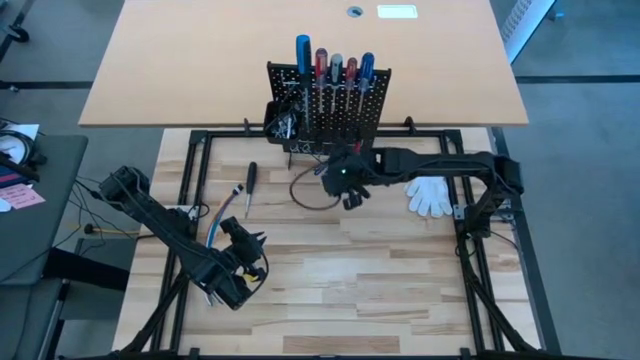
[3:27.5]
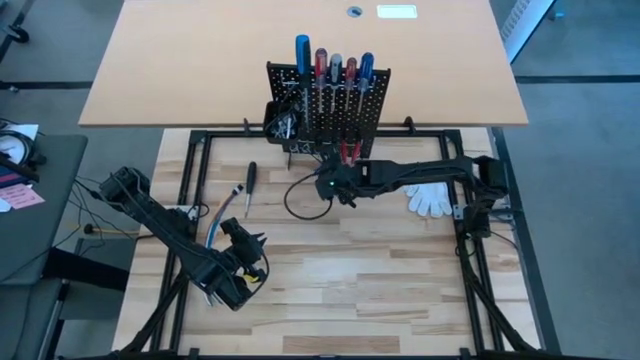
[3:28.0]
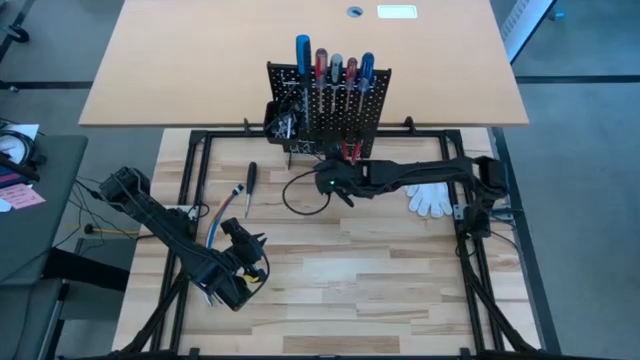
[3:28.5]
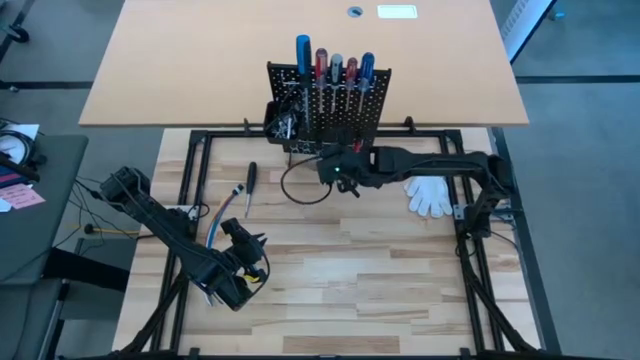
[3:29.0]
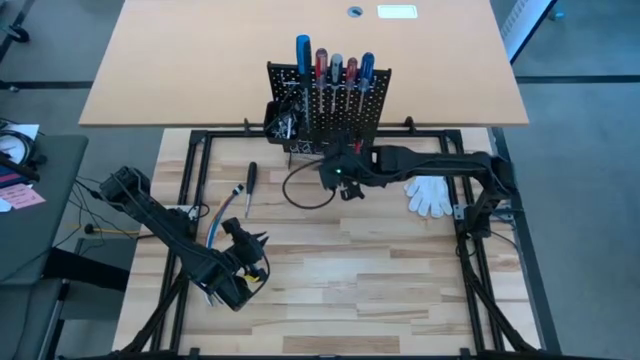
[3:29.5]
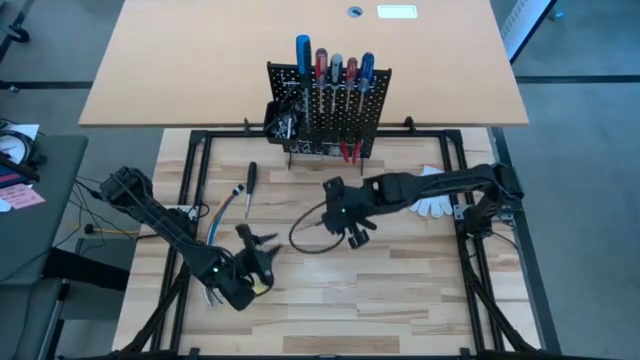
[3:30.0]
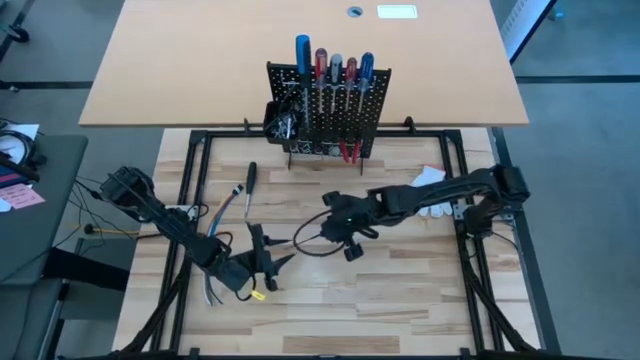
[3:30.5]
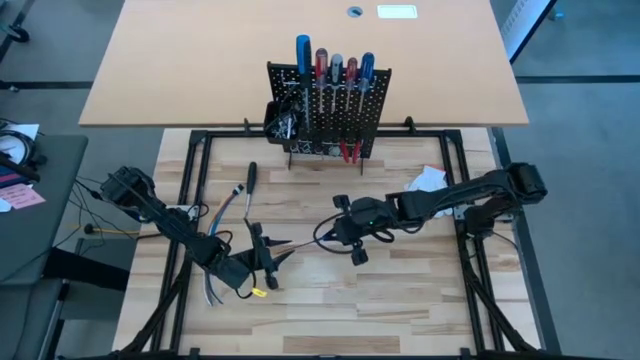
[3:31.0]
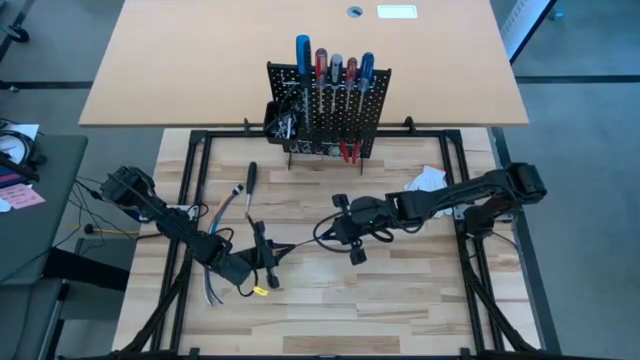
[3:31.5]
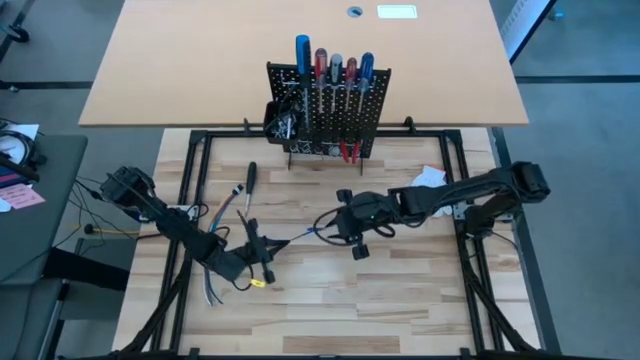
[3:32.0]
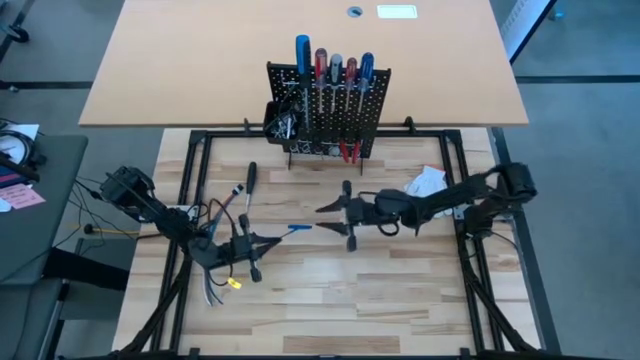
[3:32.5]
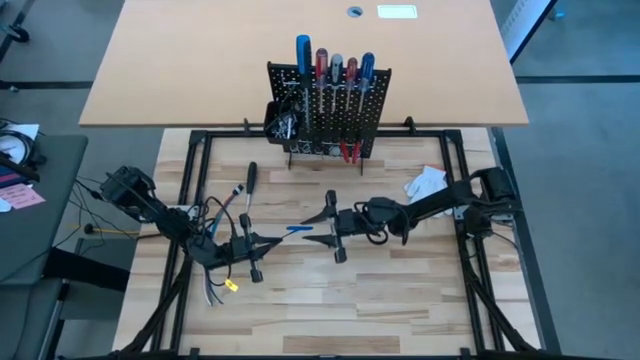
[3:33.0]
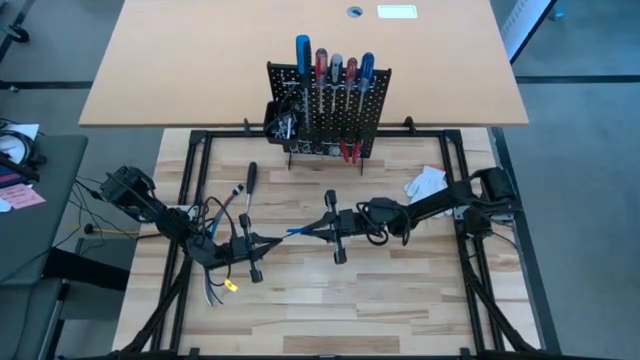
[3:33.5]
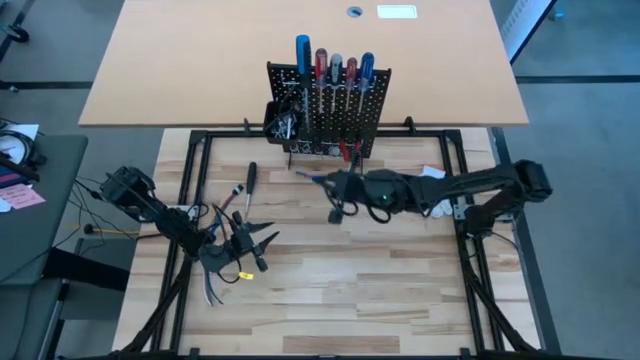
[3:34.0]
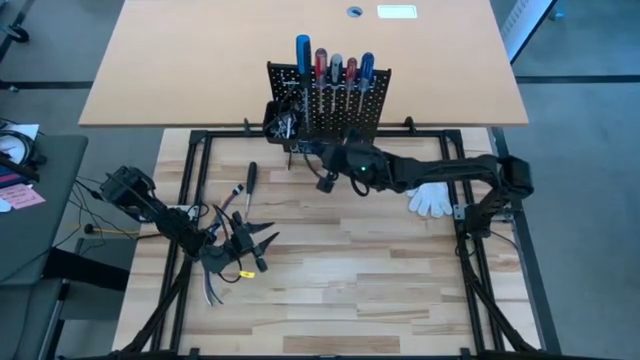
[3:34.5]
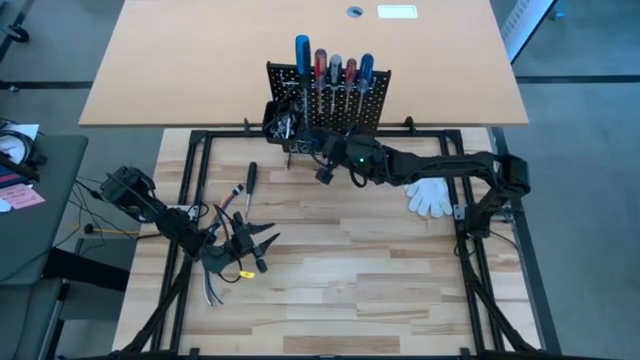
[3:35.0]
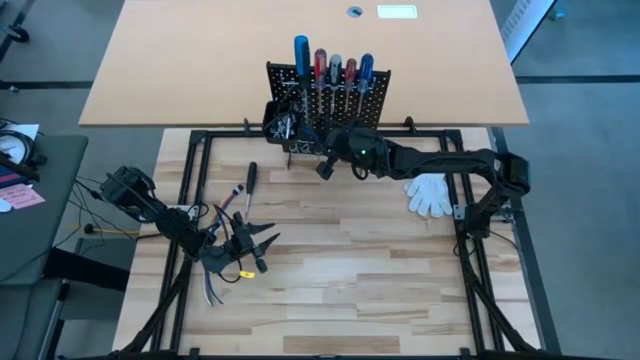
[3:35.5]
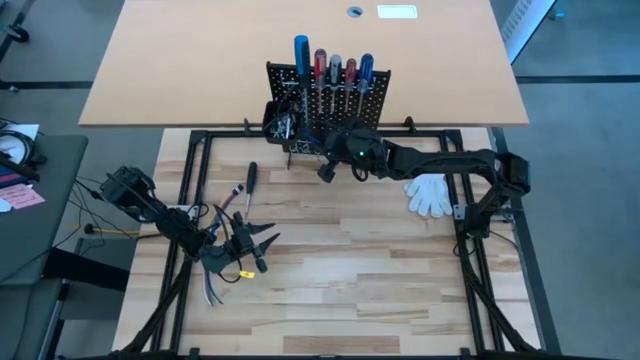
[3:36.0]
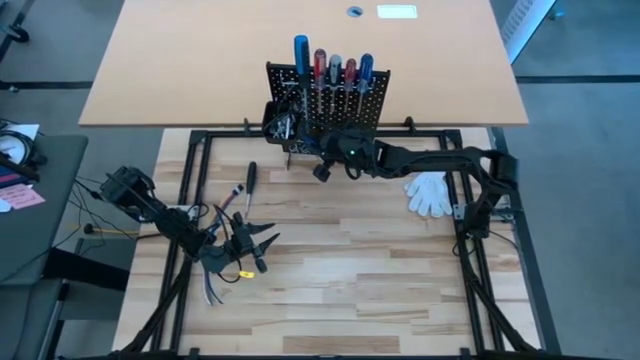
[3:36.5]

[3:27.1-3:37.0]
Task: Hang tools onto peg board
Hang the blue pick tool on the black pegboard

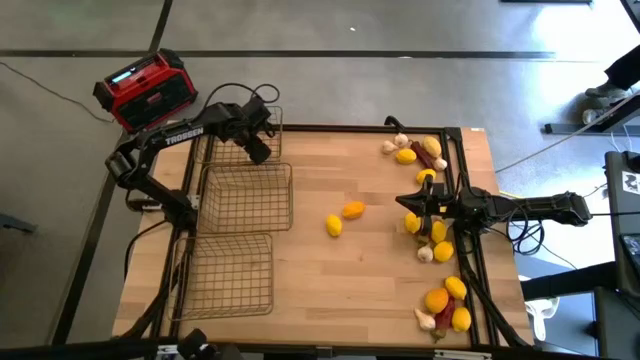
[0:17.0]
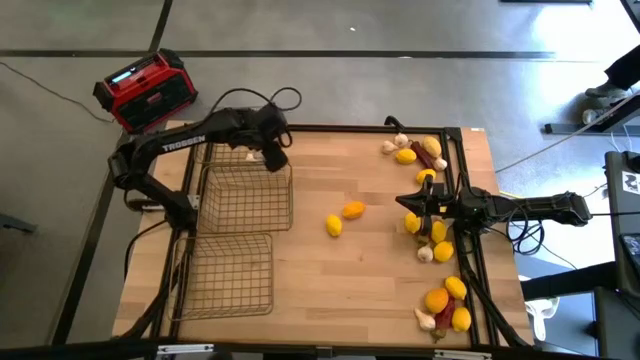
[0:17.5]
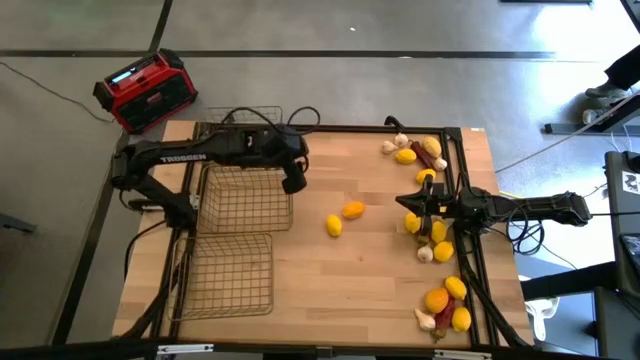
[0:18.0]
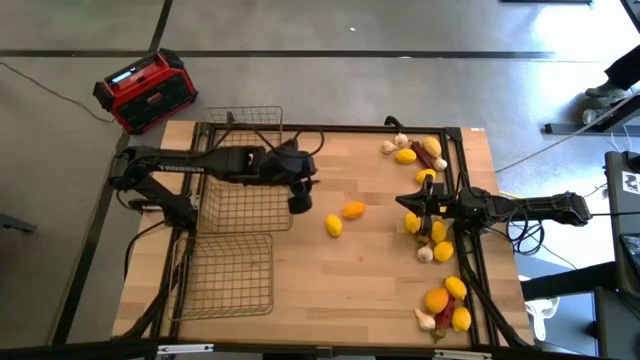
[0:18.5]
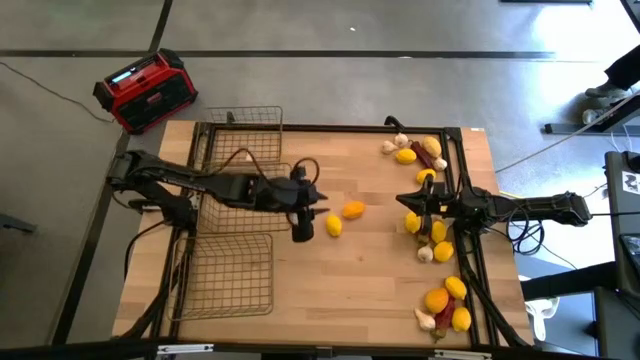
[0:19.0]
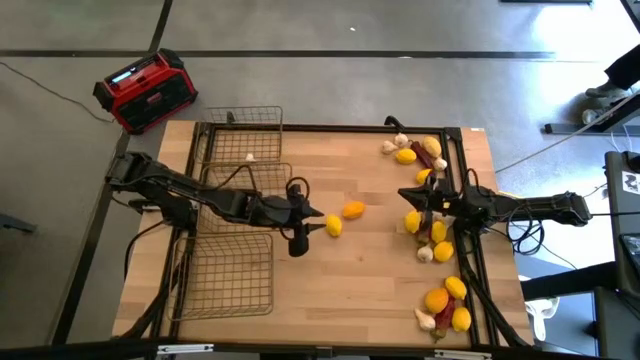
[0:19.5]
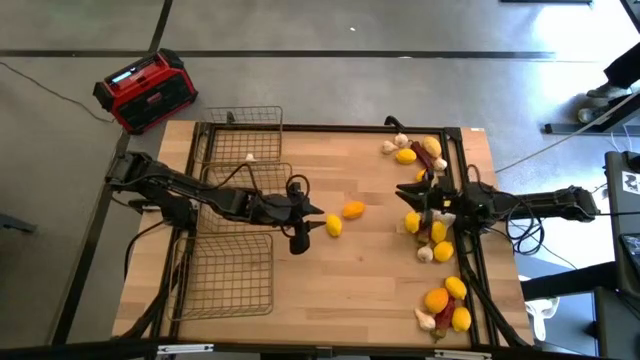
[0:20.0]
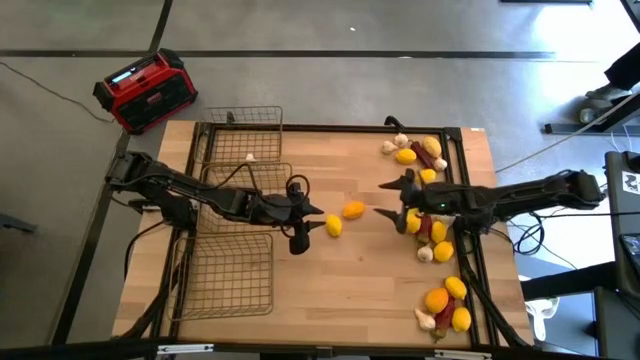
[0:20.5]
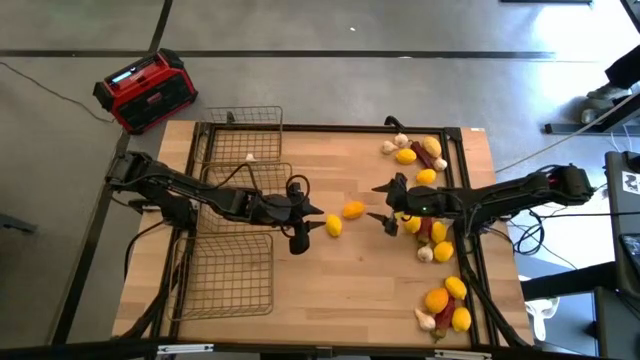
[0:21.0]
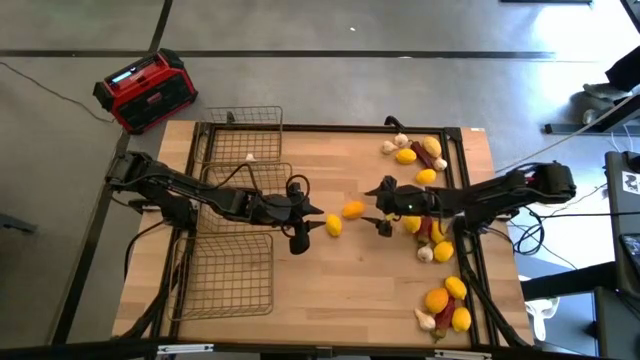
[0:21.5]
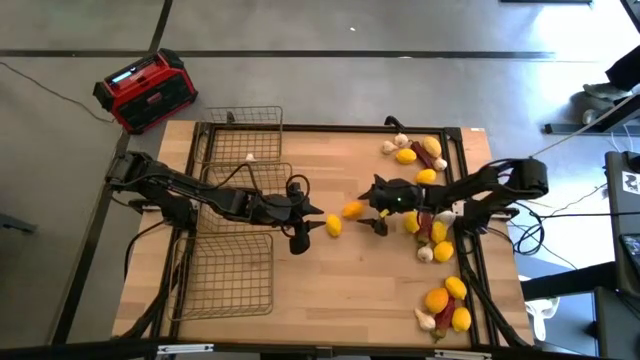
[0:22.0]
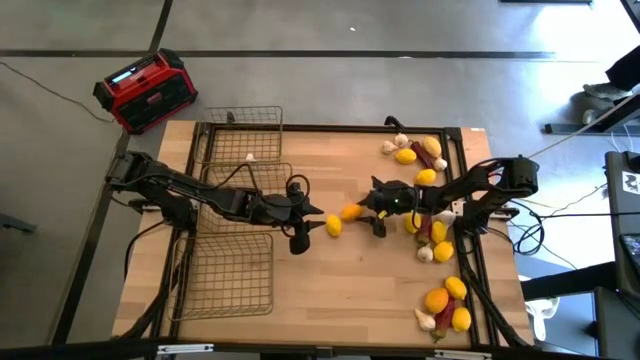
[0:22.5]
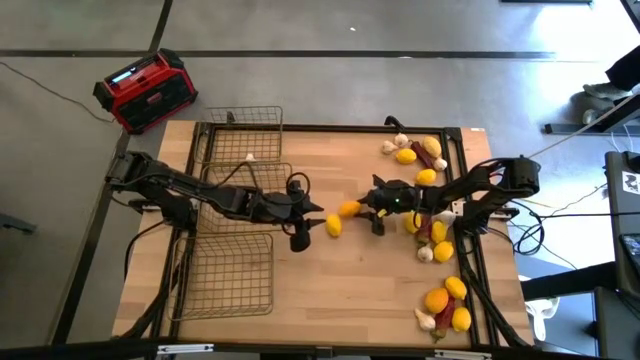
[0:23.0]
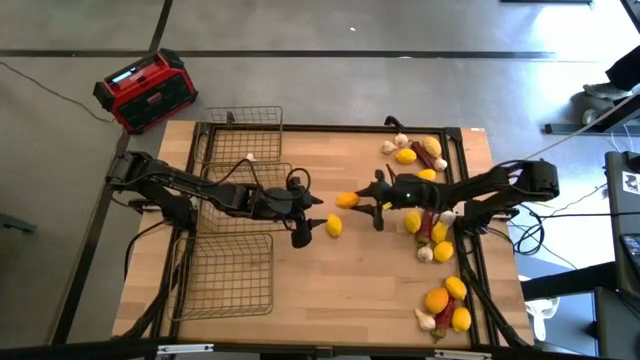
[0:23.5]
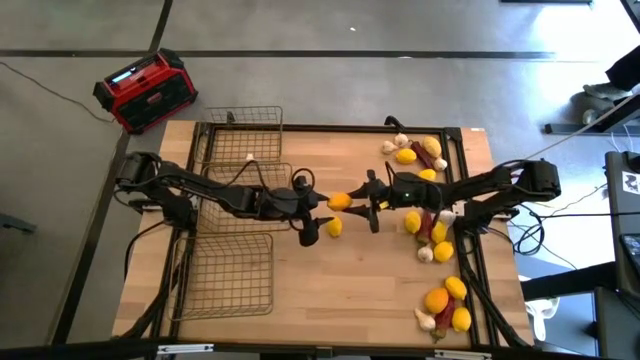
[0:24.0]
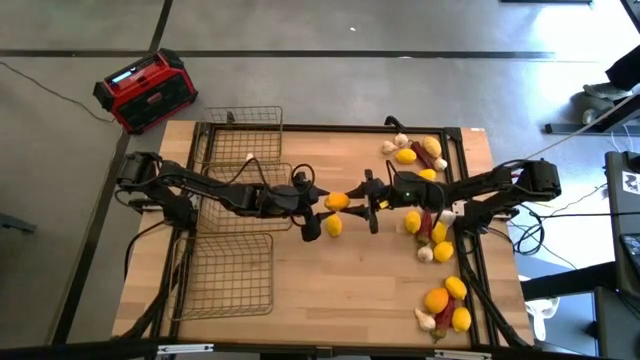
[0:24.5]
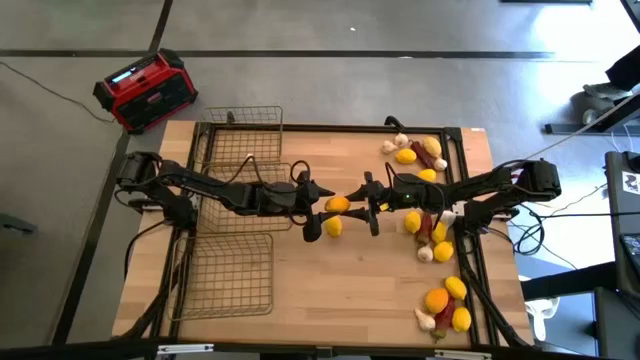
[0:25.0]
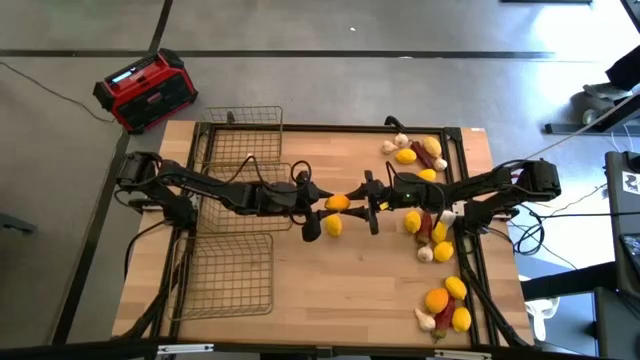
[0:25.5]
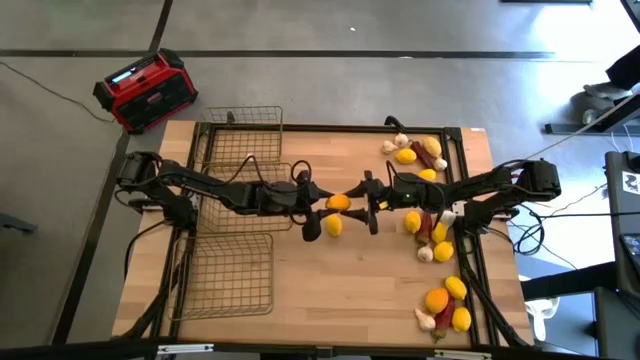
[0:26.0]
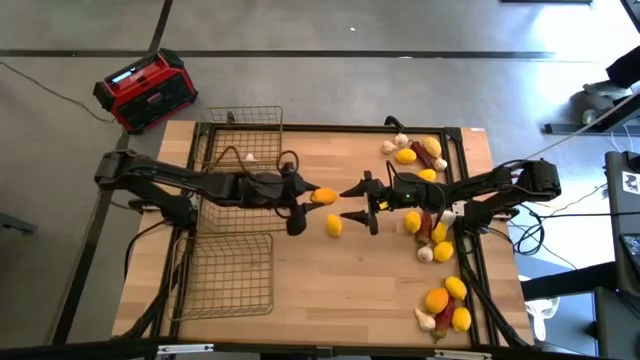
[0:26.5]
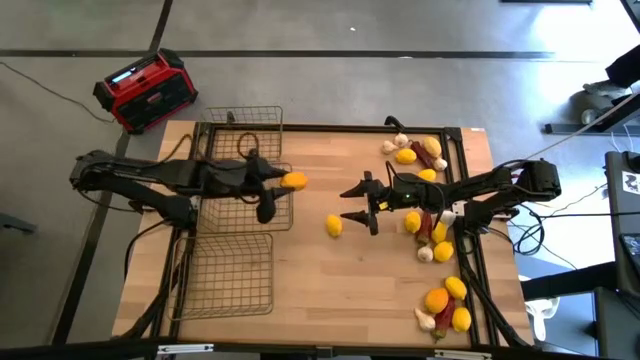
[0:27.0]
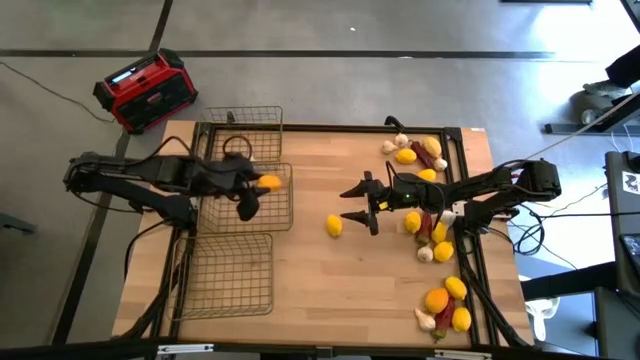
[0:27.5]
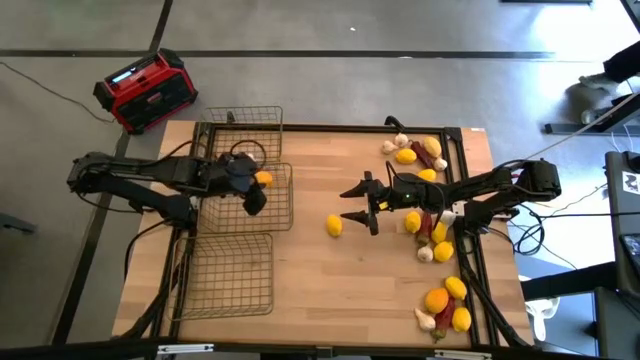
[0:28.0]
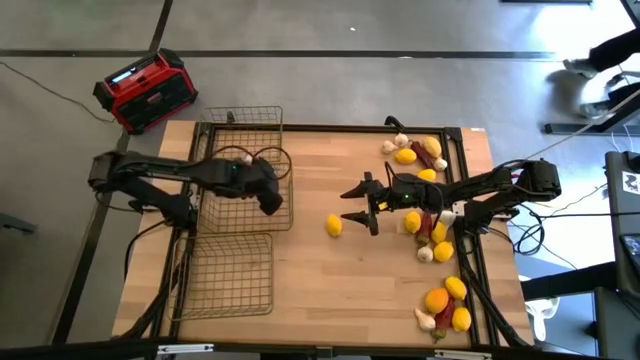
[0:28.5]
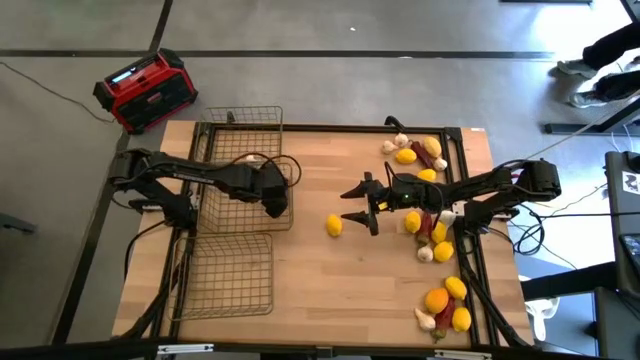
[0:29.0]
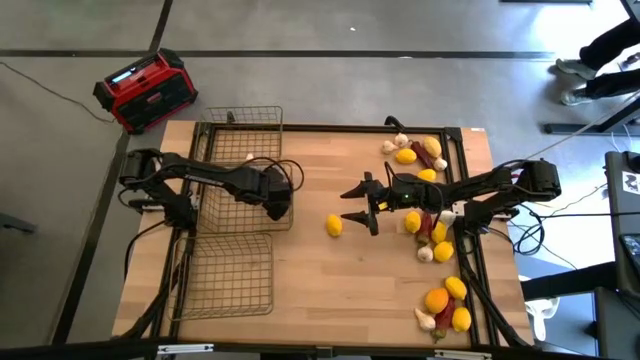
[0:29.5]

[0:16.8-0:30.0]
Task: Sort produce into baskets
Put the lemon in the middle wire basket
